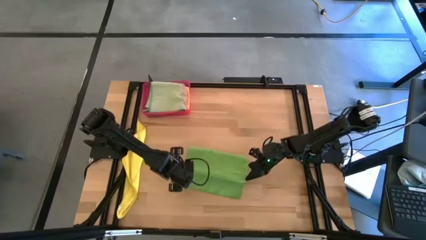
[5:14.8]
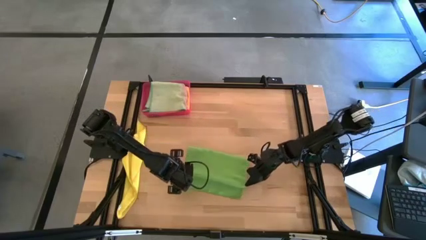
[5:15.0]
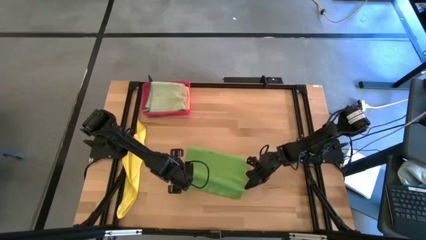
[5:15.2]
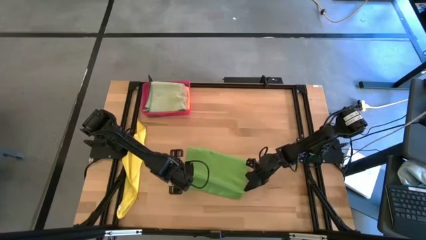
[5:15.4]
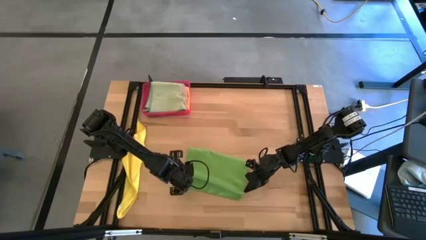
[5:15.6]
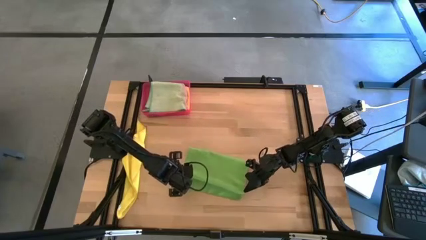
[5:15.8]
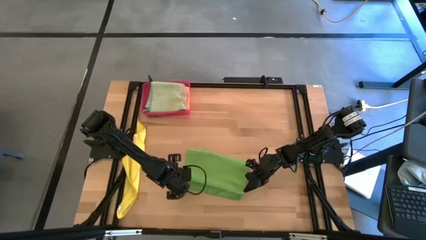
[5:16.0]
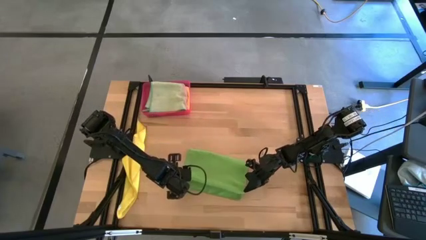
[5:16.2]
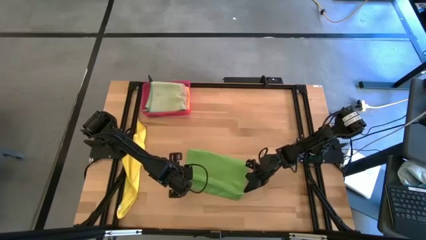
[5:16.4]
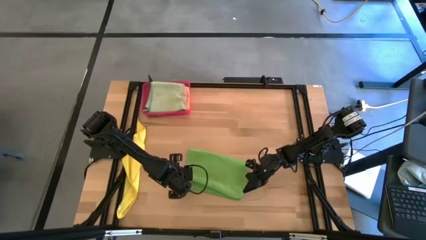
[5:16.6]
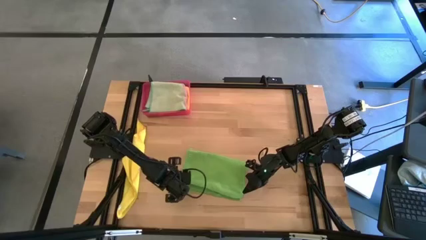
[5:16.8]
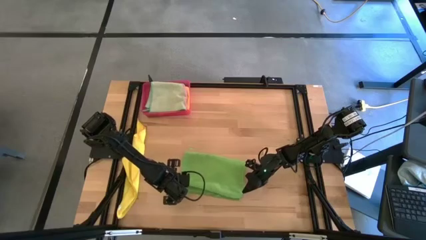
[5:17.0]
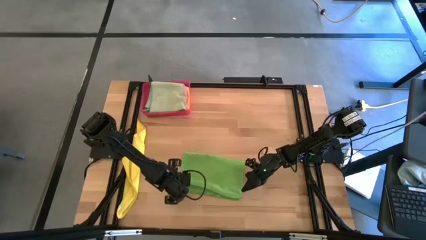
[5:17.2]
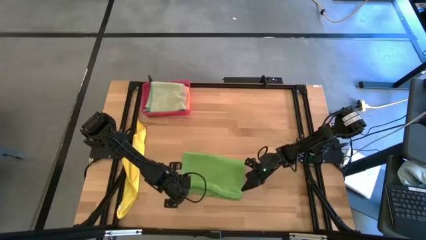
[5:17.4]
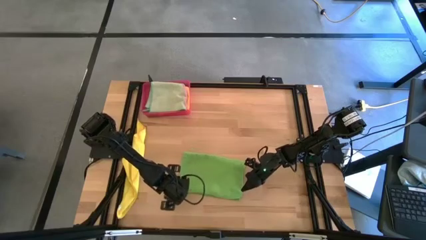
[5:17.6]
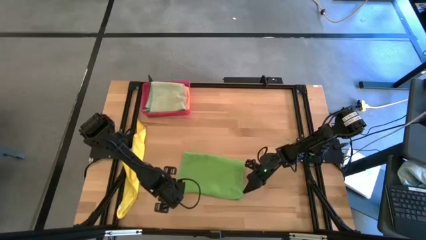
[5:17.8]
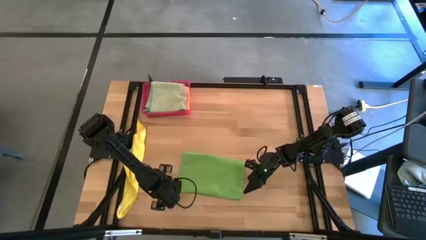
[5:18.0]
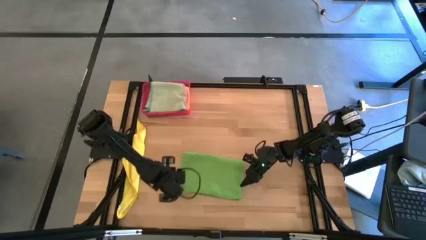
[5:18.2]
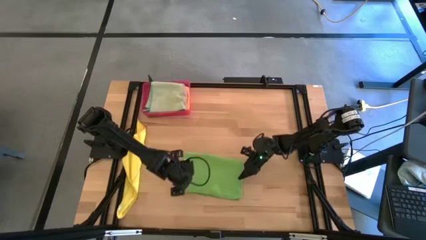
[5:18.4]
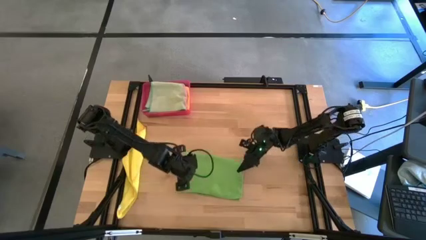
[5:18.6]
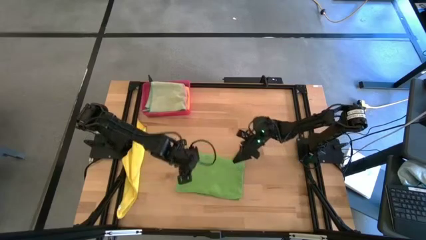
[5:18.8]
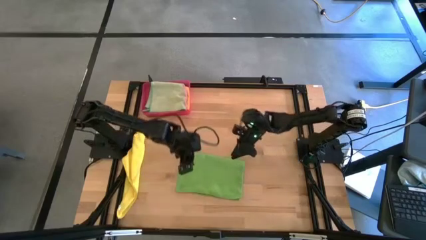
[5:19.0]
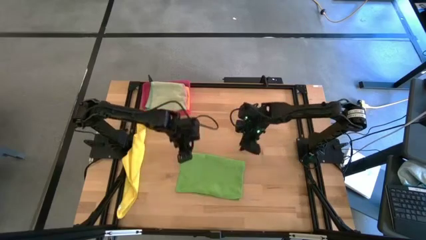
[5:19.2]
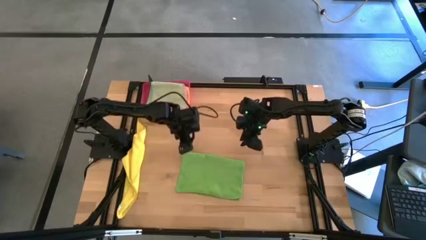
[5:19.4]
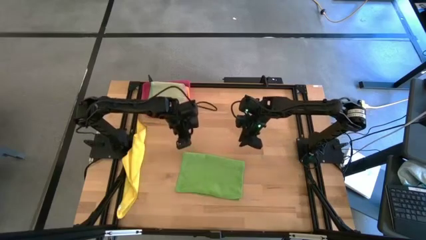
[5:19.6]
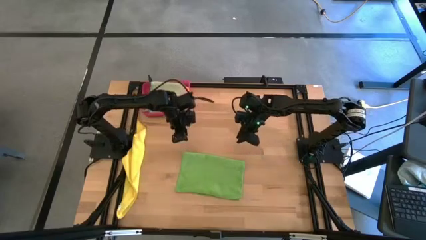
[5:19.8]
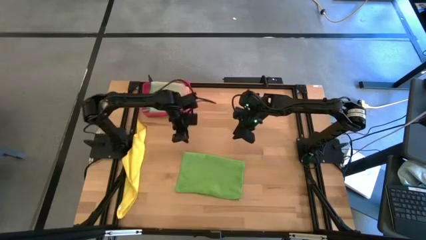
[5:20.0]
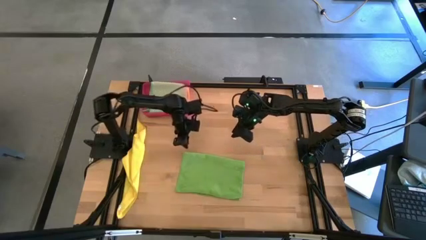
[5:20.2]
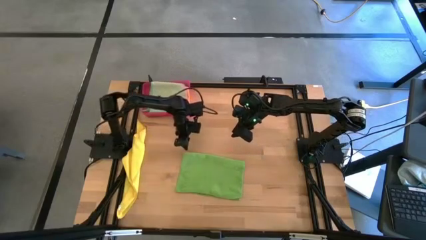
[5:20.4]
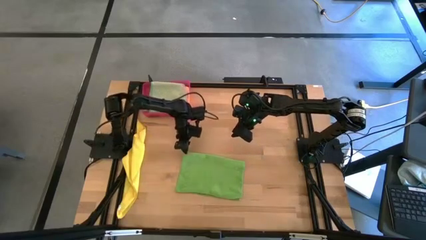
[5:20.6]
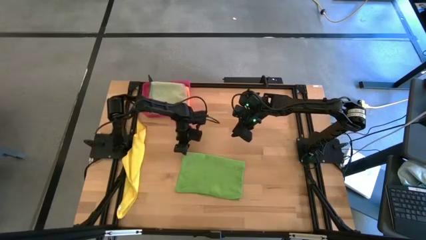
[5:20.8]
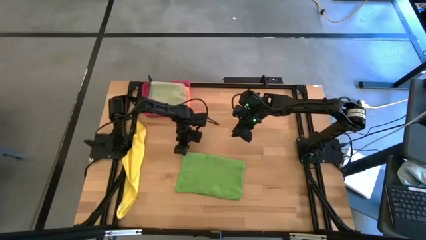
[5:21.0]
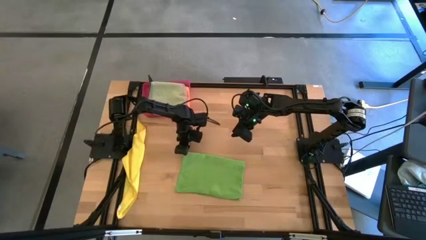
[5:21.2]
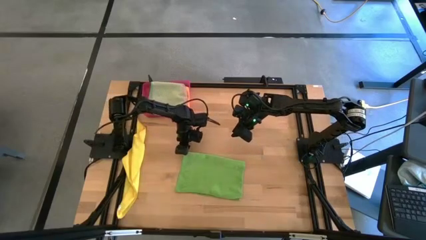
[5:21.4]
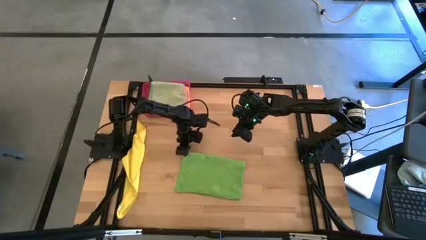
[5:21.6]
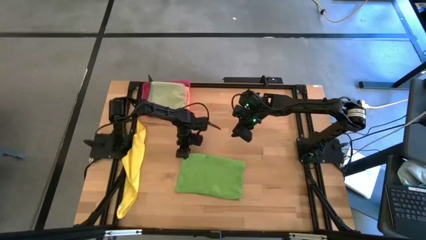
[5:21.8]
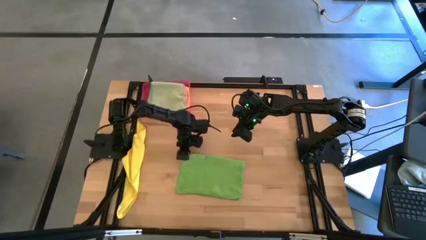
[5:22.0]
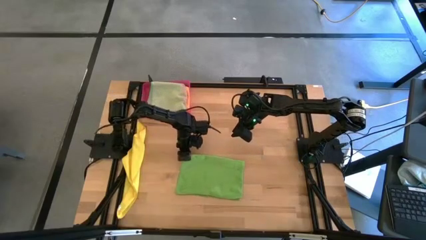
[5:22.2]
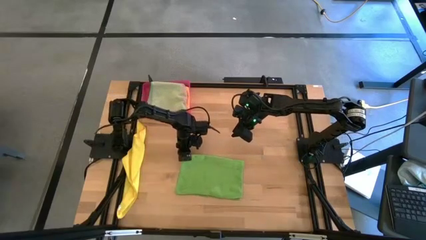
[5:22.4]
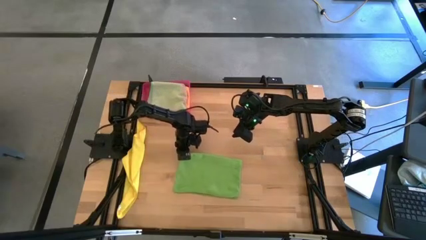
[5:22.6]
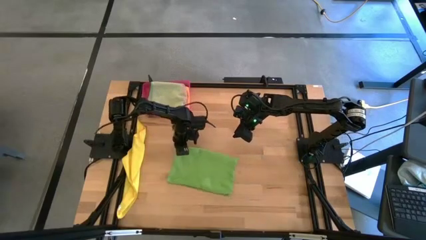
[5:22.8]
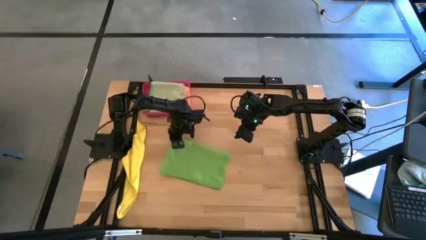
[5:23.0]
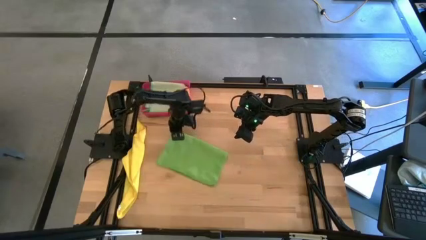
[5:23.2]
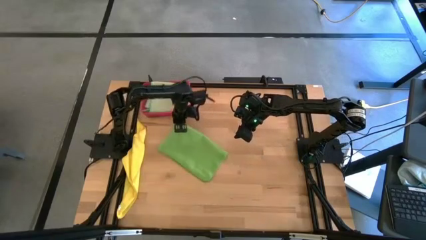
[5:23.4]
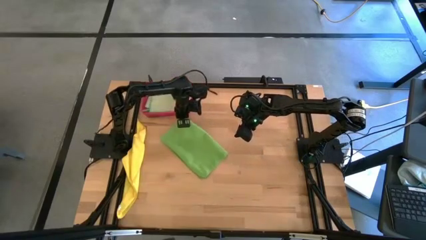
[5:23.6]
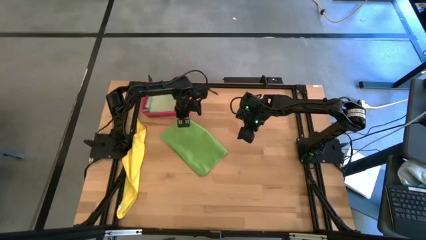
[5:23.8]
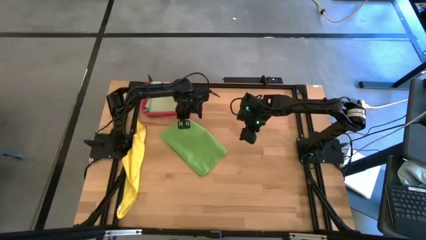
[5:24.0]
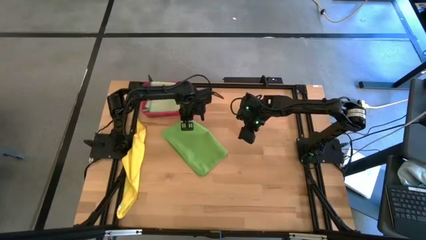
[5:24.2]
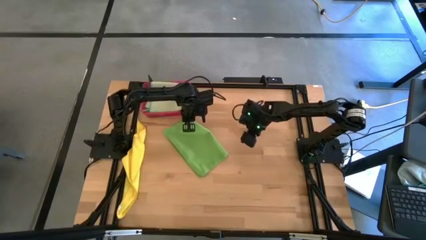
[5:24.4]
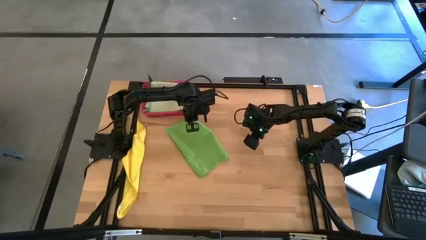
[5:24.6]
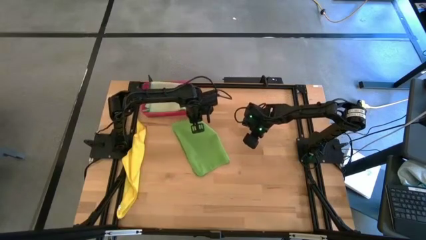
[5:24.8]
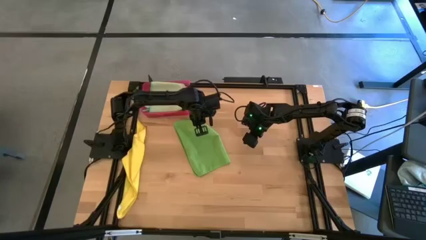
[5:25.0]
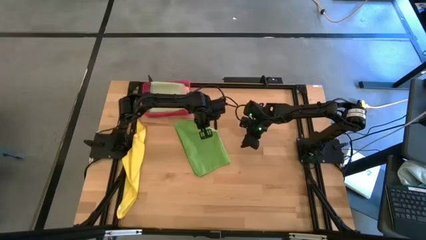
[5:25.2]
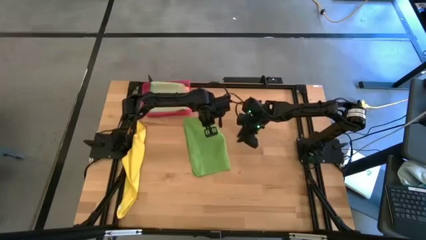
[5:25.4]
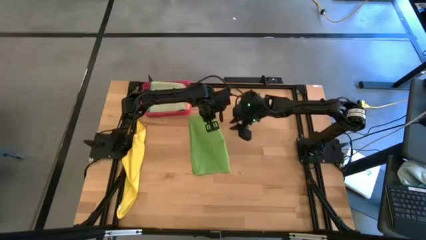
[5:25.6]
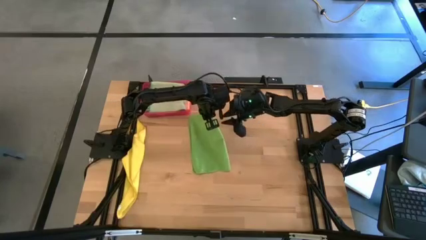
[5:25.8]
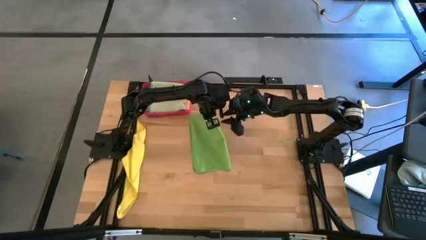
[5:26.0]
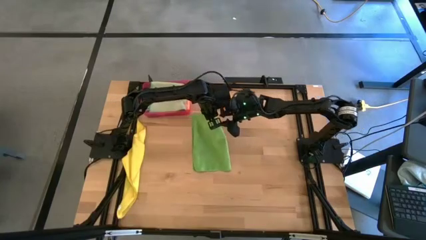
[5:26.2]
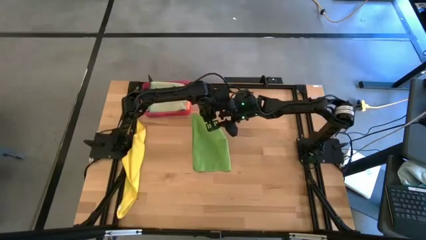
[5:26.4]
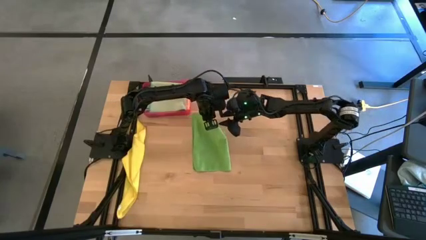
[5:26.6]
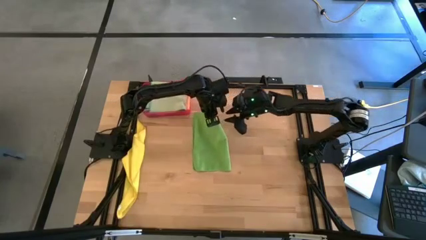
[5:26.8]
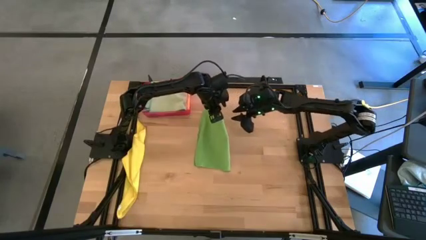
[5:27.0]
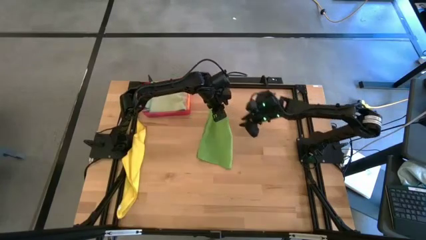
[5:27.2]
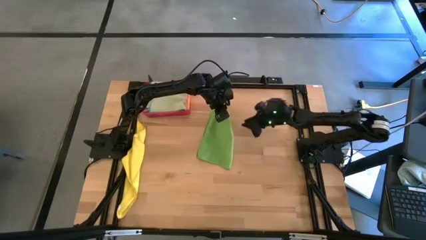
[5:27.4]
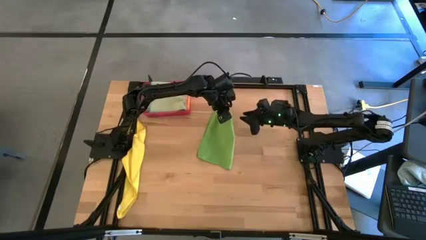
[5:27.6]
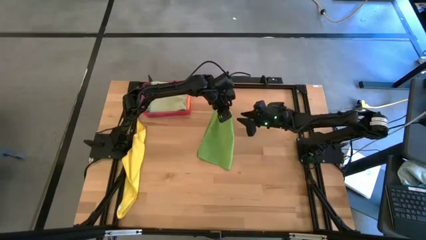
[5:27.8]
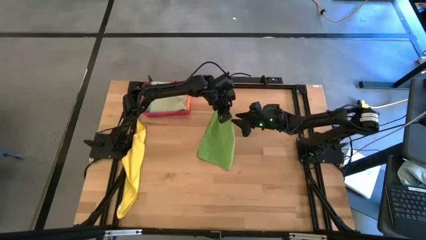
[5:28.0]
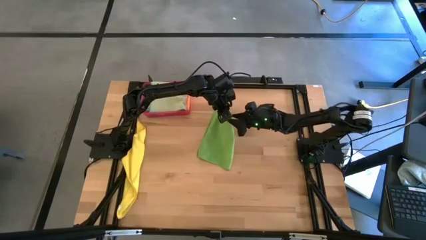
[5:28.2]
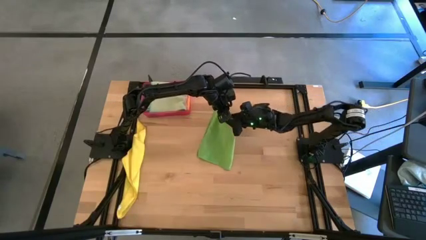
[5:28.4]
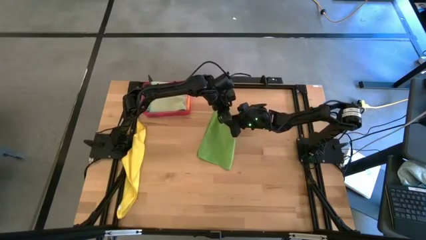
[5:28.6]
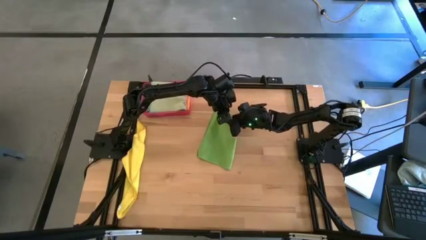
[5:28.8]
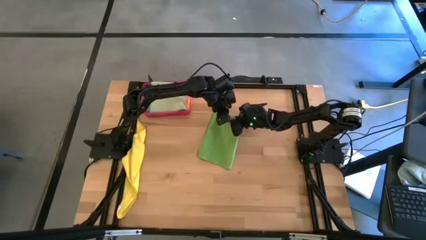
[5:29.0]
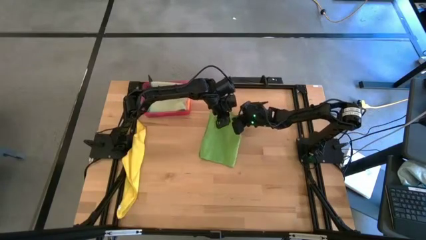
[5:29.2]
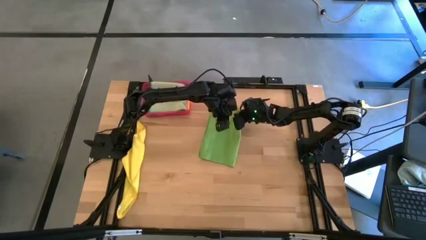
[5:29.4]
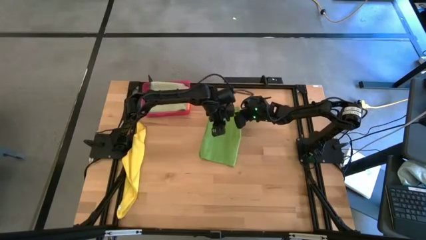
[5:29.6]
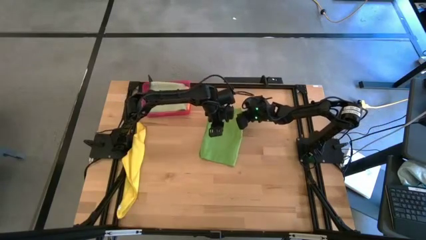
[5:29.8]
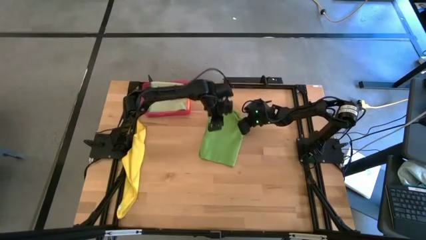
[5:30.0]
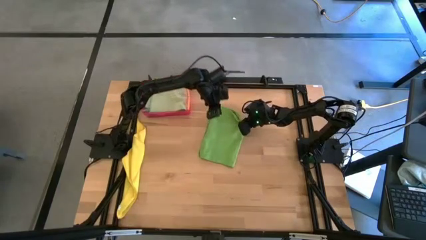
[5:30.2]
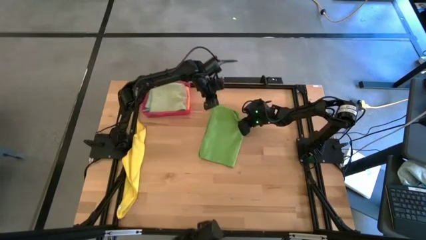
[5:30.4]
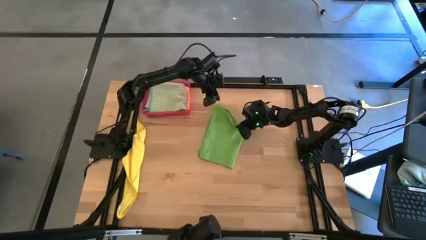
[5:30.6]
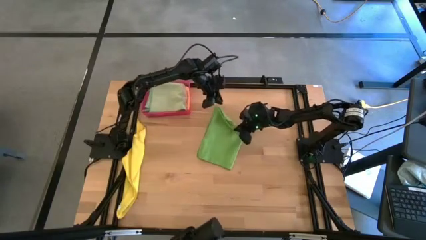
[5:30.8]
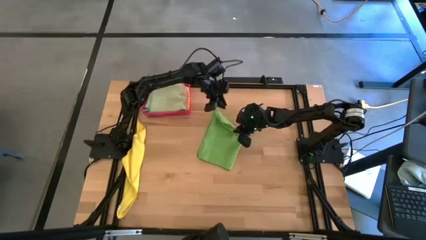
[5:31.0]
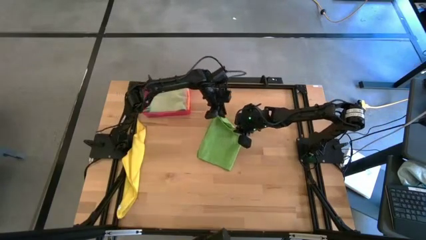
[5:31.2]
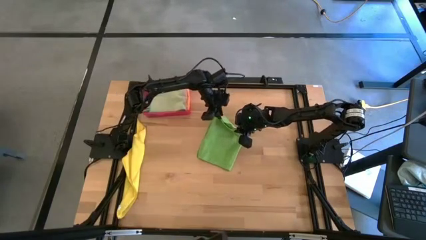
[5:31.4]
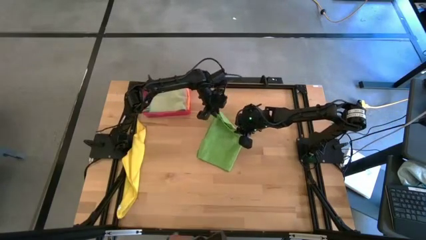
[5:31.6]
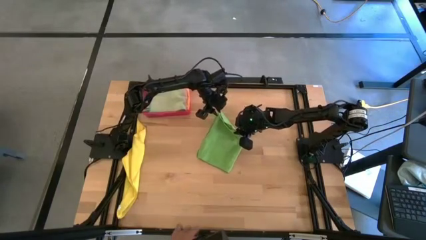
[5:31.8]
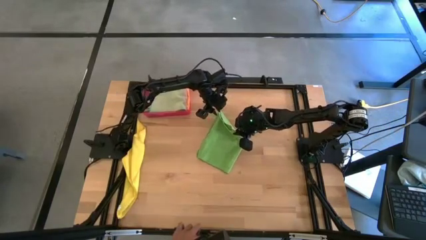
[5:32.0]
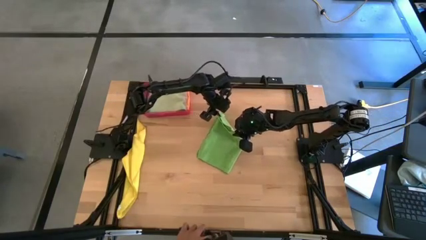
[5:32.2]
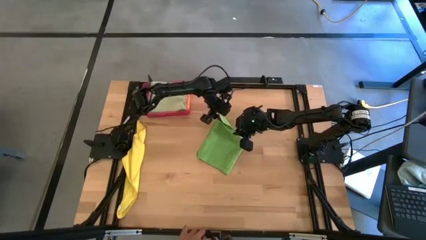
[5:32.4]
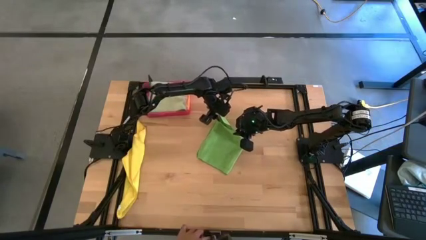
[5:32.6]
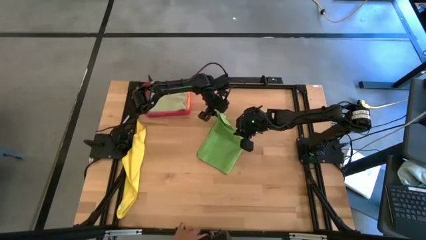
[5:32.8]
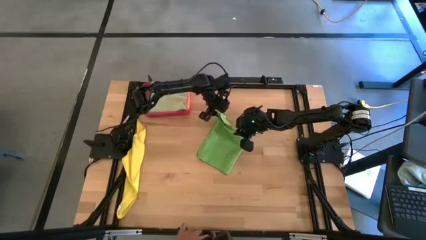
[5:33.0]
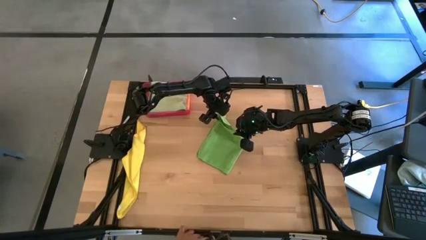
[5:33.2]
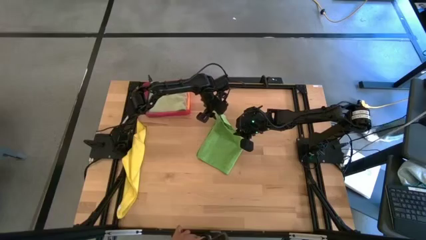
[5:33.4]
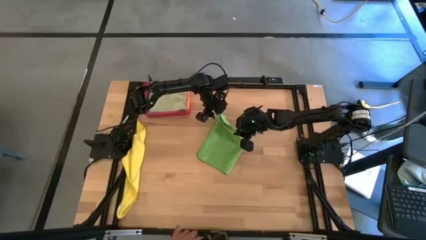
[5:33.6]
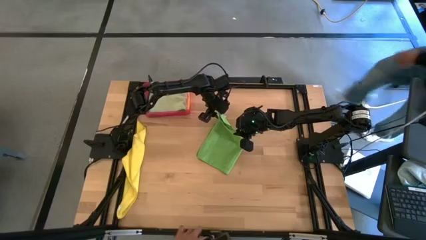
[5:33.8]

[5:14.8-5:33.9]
Task: Fold microfiber towels
Fold the green microfiber towel
